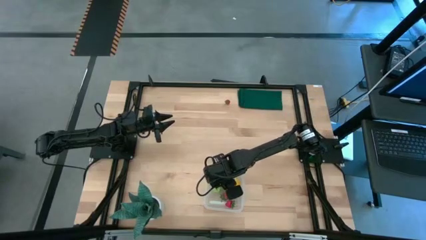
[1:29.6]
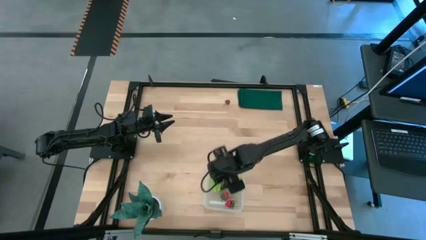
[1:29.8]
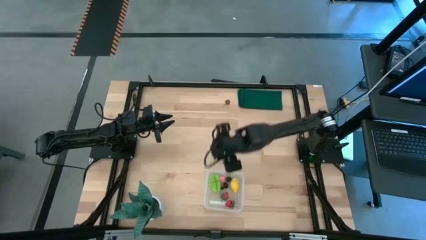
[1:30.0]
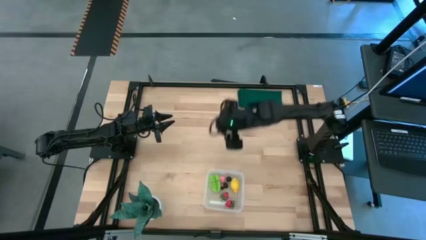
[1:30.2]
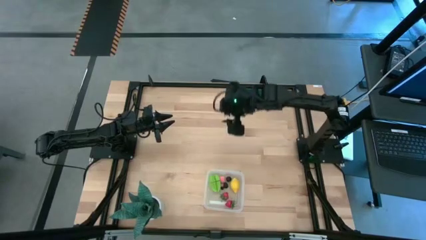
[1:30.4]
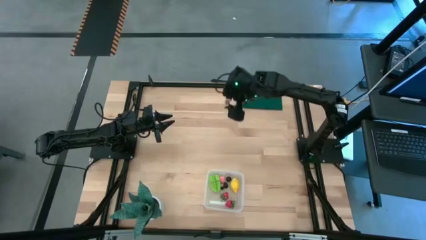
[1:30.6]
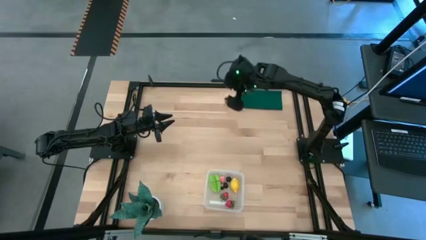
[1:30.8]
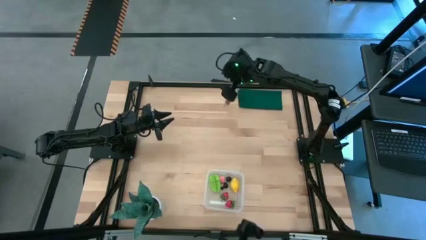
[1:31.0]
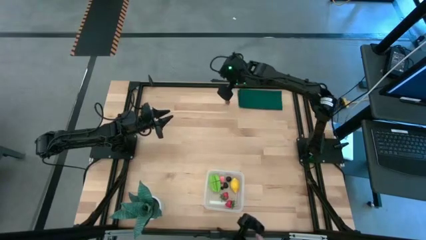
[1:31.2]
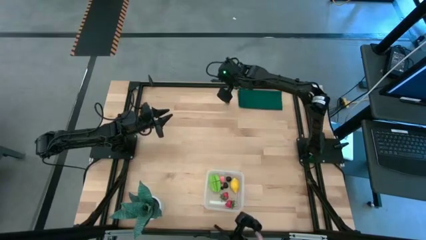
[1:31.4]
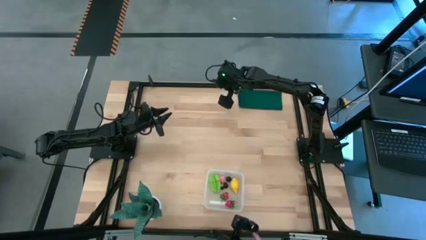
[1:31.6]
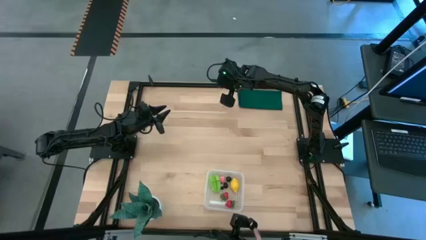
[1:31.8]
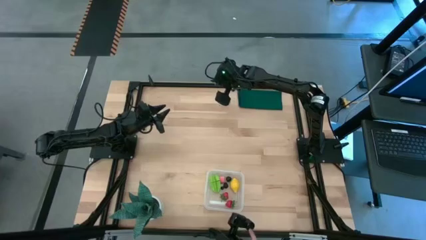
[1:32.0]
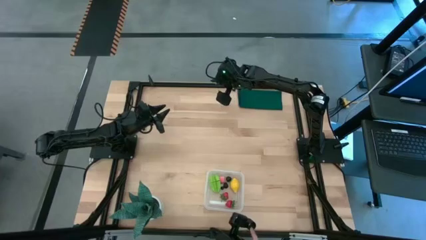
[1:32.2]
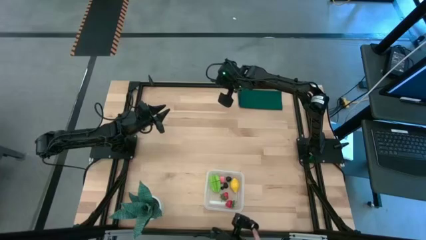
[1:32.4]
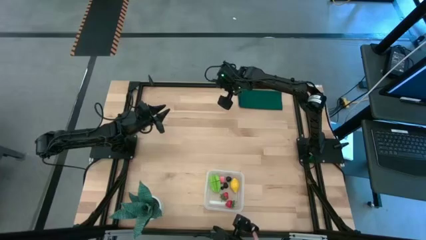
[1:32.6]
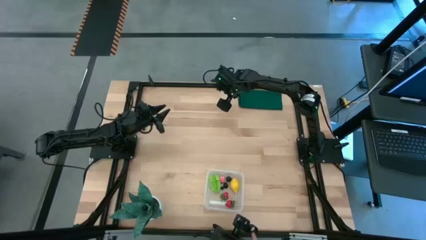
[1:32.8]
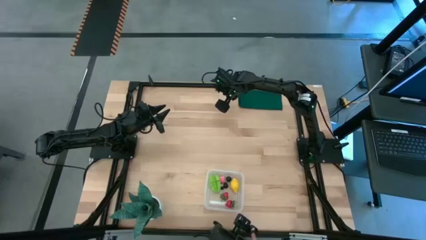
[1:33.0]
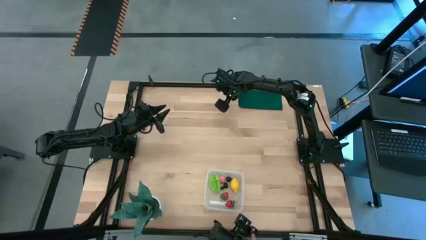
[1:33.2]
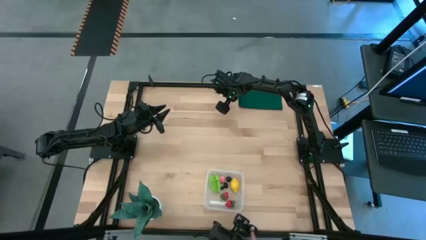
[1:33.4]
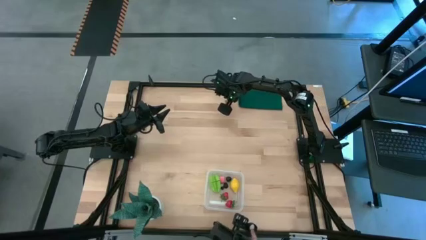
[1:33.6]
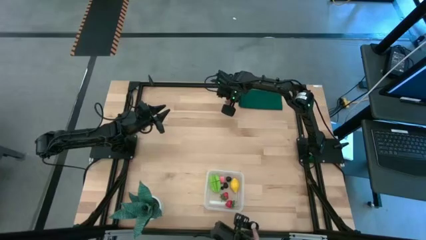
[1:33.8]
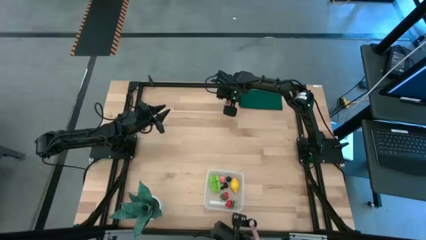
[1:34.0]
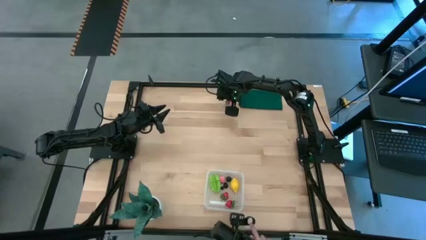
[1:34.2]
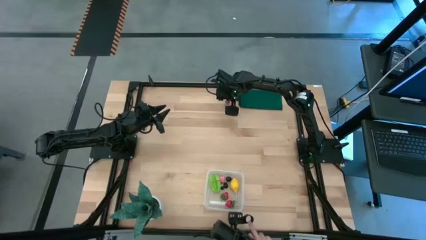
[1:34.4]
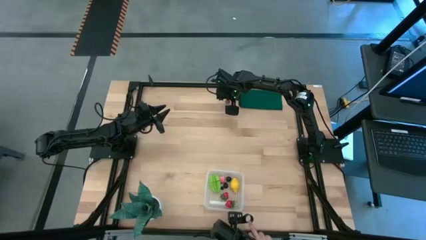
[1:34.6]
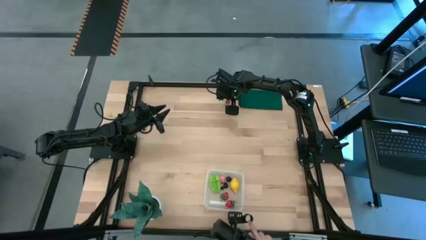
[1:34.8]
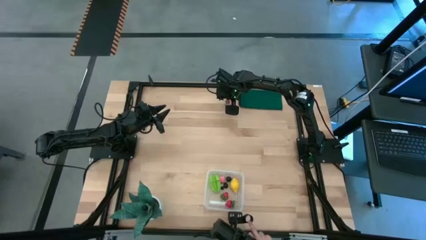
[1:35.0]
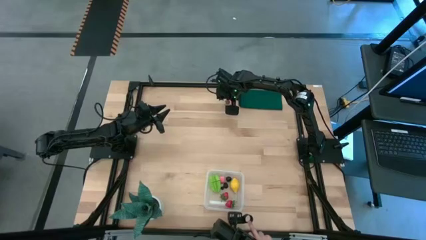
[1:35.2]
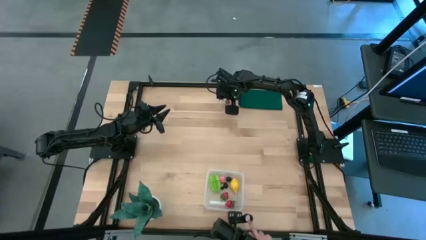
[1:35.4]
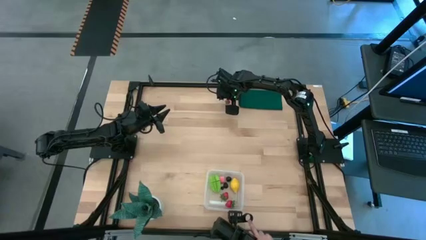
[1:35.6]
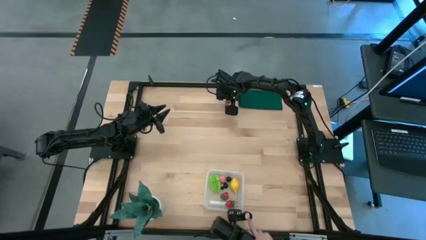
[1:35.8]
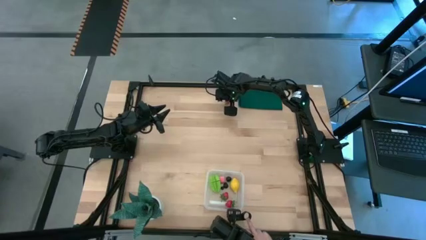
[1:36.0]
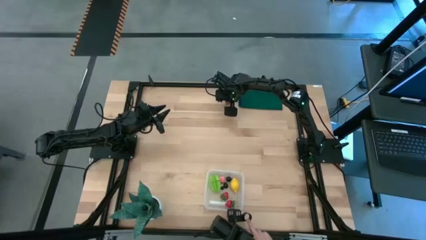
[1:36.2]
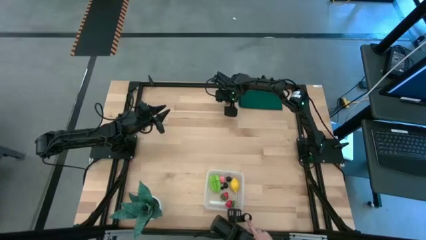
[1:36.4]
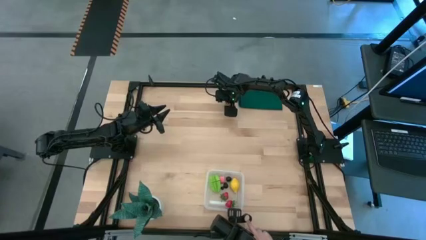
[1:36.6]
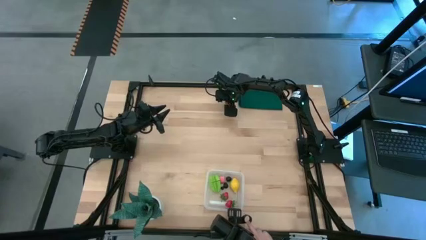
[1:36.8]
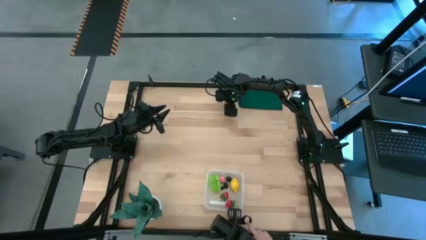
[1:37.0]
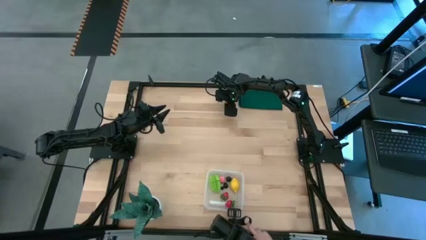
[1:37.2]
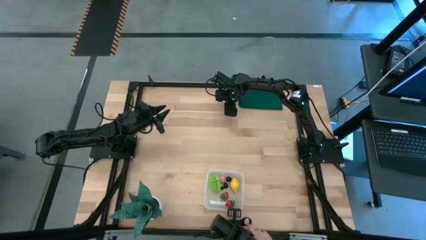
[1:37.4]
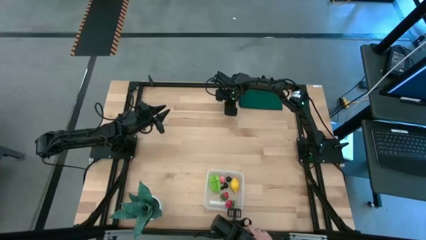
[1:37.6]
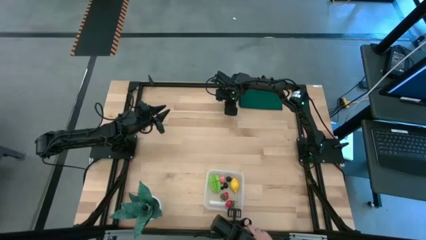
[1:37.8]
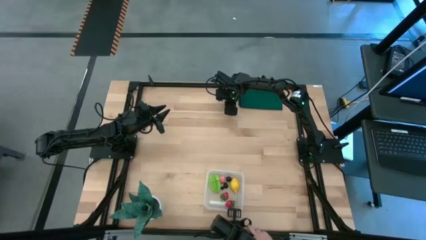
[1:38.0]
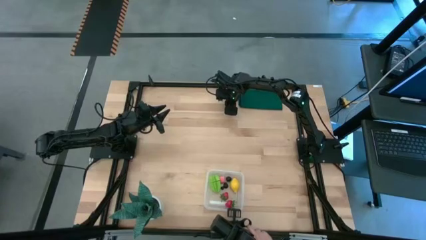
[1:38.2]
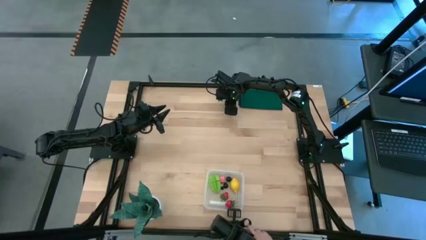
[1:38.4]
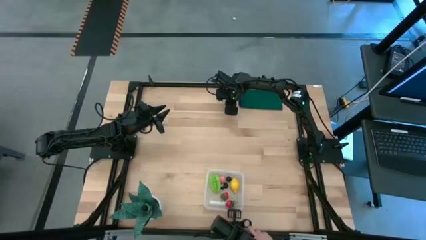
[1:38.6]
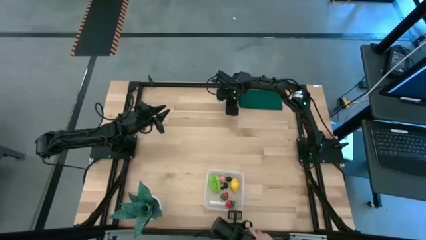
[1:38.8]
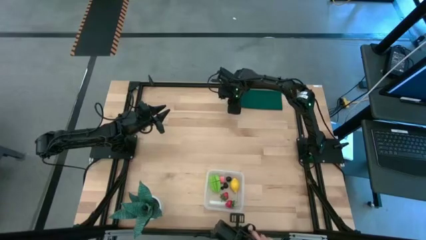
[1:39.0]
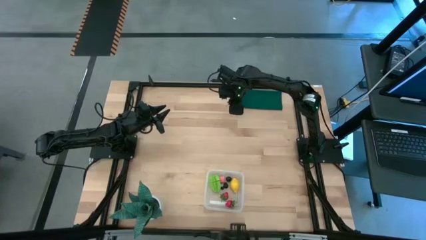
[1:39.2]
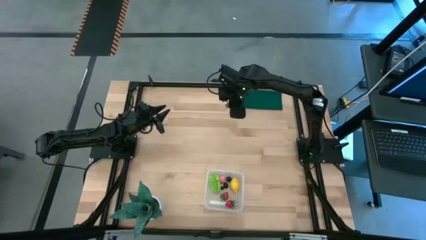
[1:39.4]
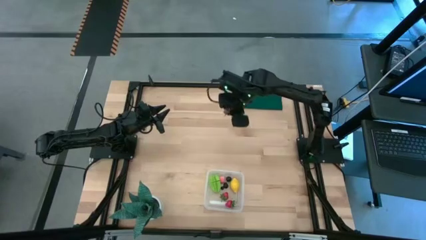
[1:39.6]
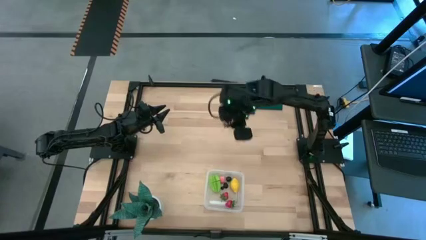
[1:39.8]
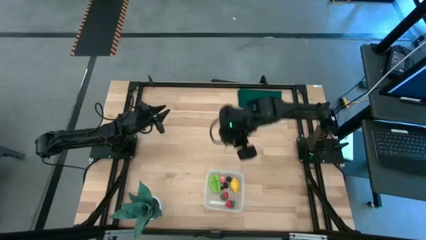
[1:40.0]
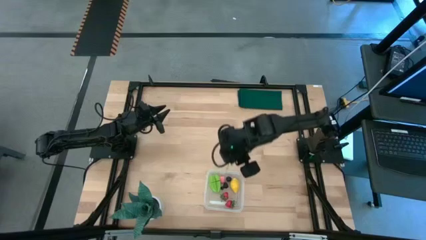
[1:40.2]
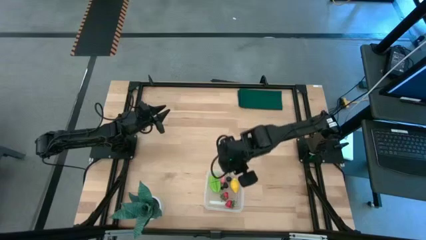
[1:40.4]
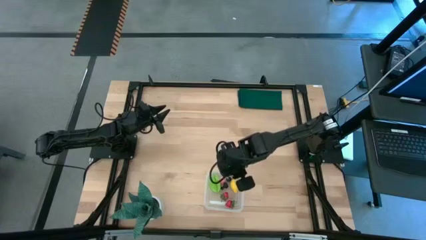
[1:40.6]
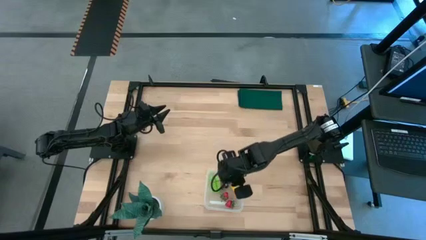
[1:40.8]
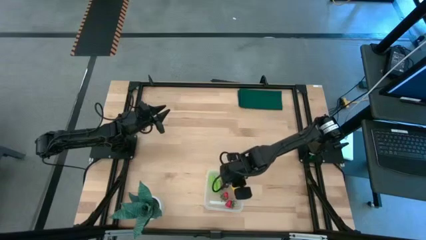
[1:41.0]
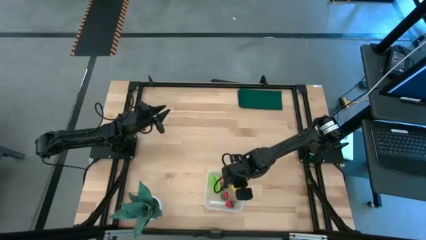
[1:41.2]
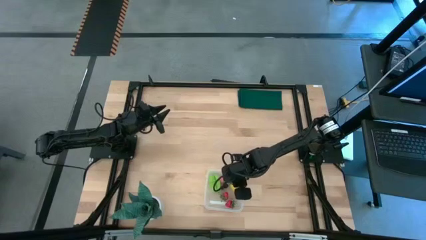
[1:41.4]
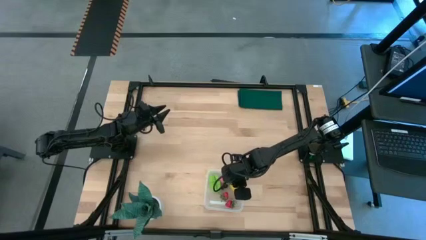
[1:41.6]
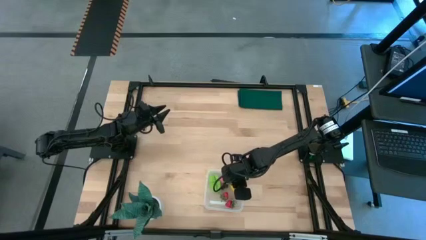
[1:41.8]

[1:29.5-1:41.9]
Task: Pick and placing Produce into tupperware
Put the red strawberry into the transparent bin

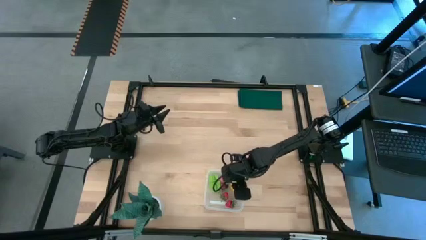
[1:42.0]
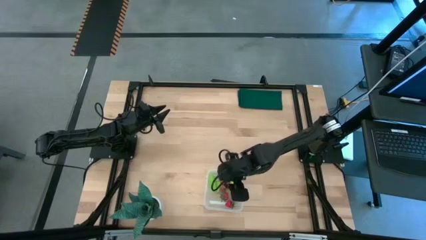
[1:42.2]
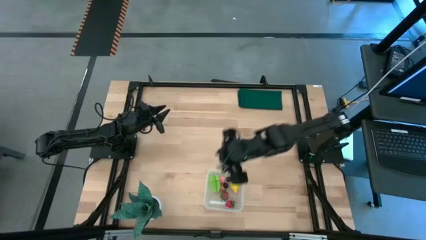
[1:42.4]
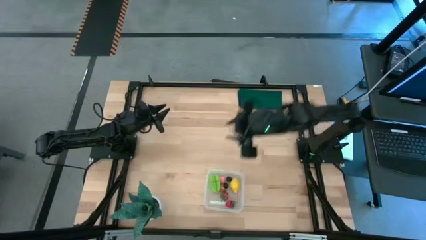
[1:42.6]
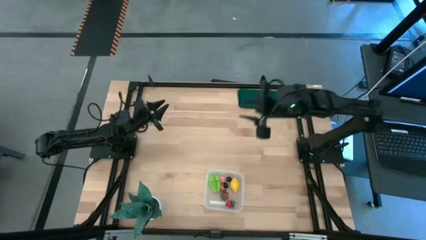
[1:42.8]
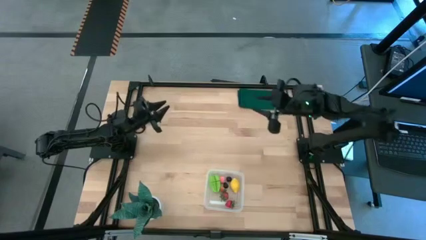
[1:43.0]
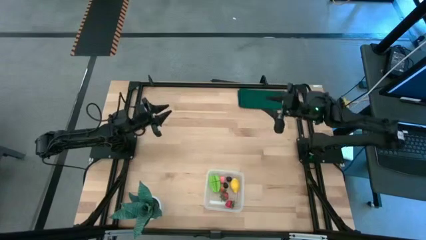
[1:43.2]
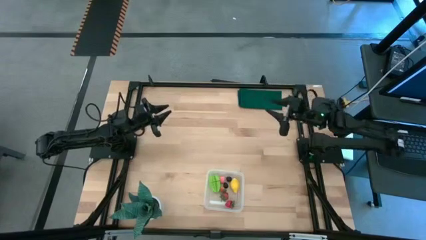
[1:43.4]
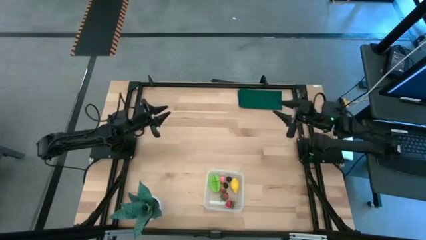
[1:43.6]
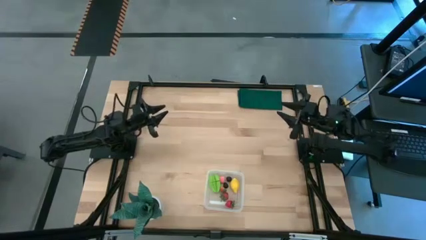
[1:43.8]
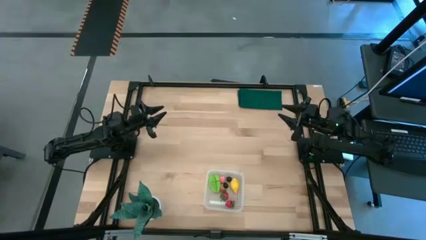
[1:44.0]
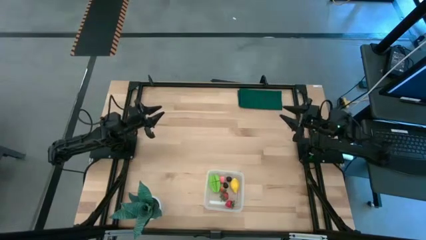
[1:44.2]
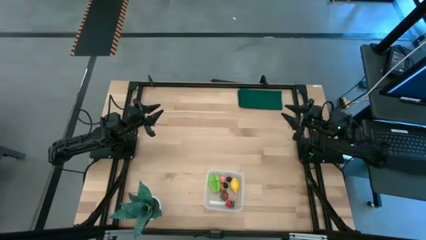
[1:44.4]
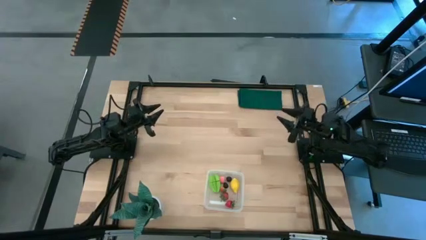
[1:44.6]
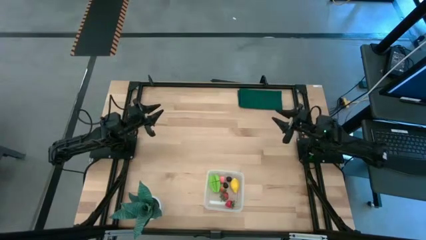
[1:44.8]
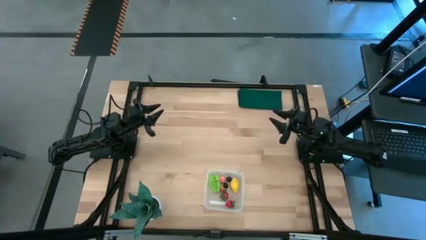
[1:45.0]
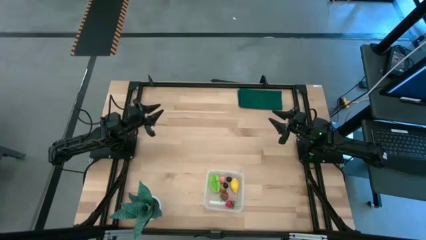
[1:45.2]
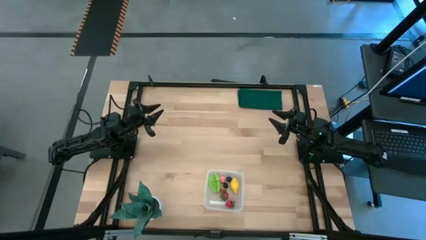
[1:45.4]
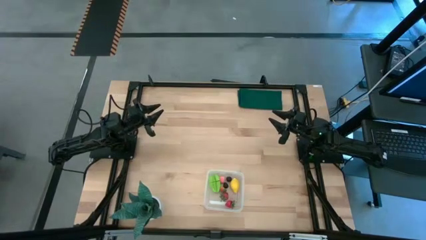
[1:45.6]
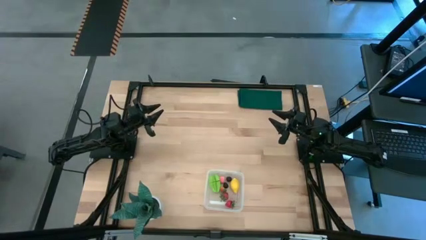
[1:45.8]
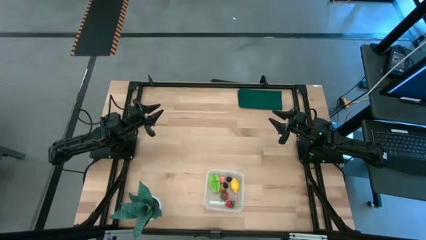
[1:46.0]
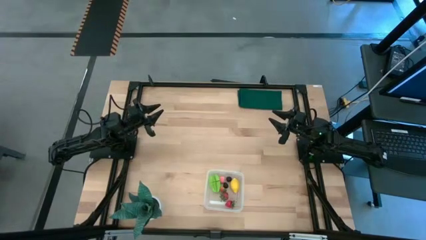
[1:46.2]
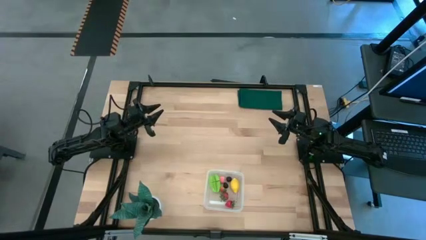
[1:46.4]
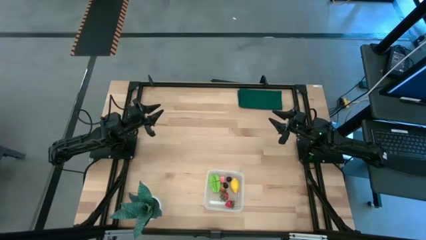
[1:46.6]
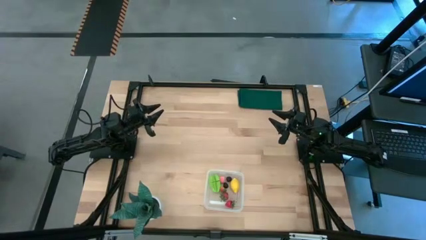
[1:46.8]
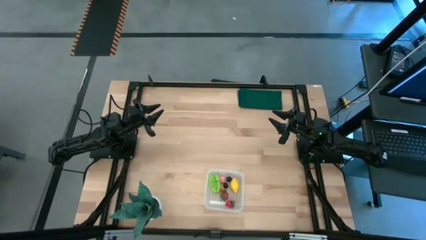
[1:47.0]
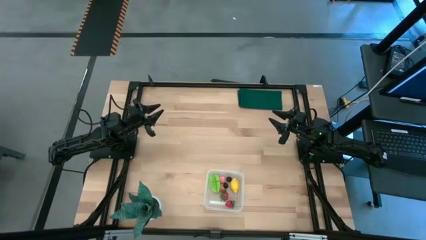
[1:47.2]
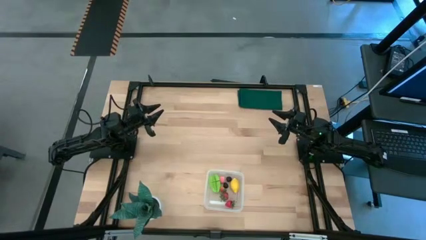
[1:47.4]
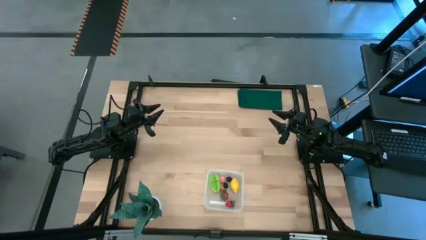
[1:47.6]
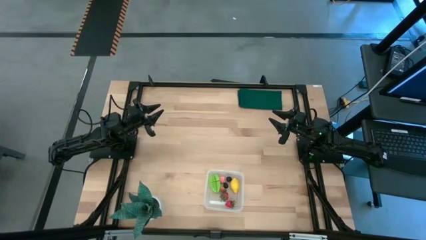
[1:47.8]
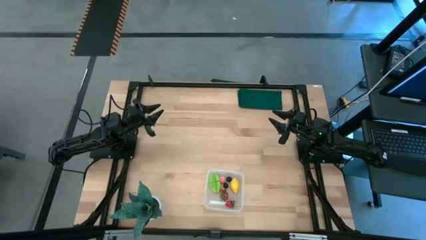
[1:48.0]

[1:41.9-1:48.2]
Return to Home Position
